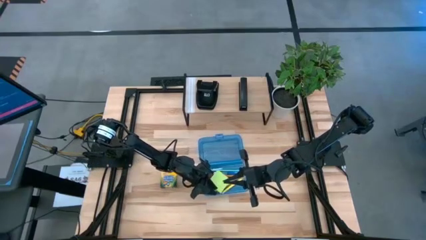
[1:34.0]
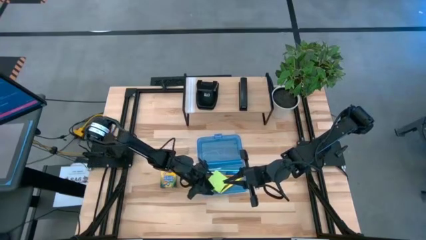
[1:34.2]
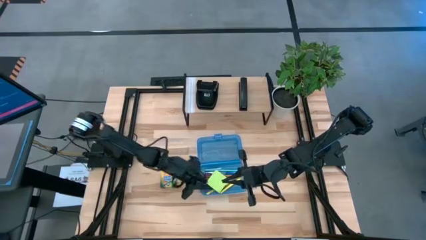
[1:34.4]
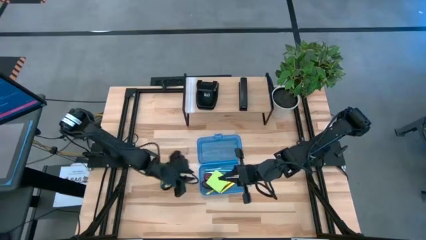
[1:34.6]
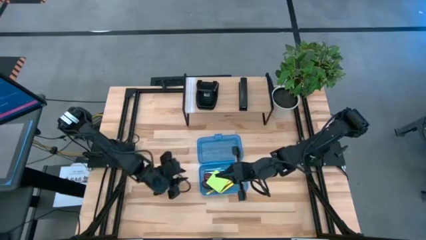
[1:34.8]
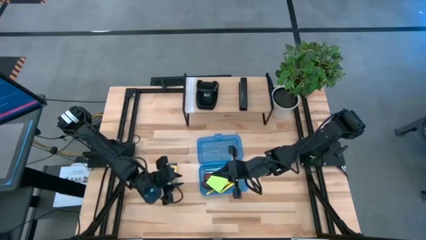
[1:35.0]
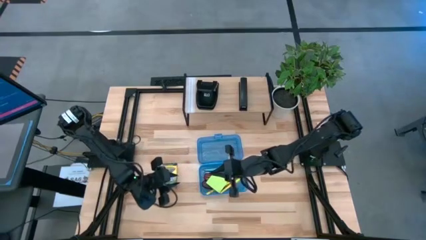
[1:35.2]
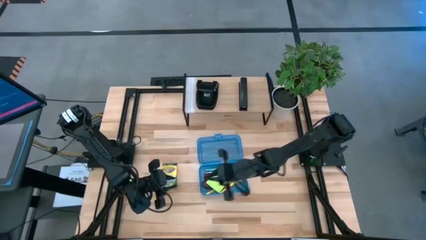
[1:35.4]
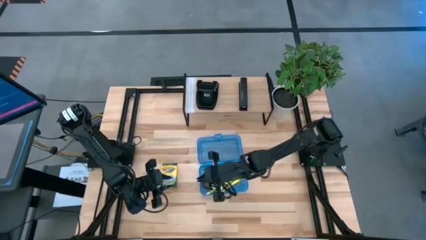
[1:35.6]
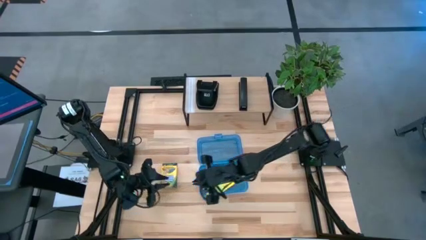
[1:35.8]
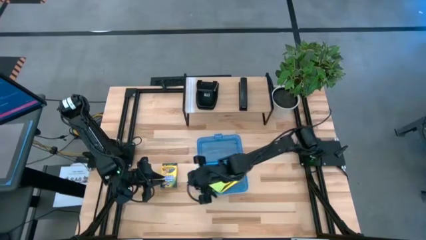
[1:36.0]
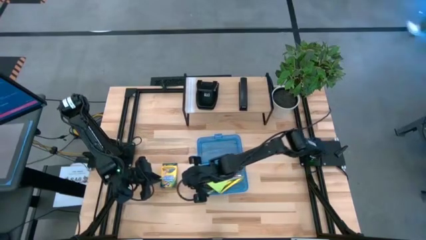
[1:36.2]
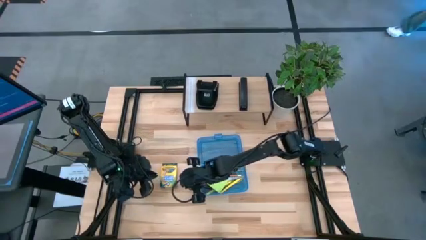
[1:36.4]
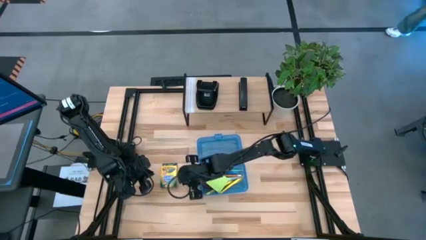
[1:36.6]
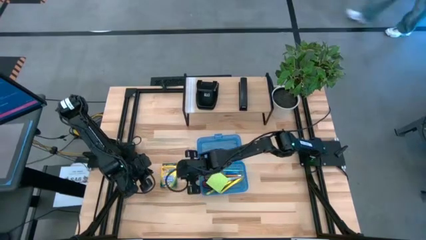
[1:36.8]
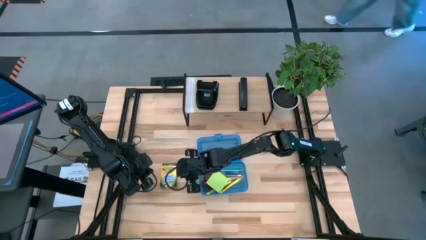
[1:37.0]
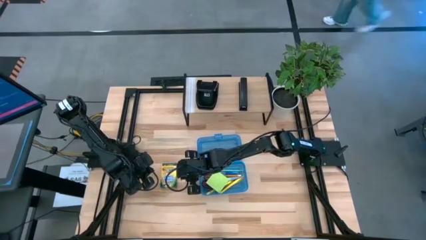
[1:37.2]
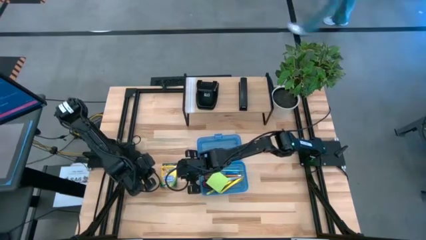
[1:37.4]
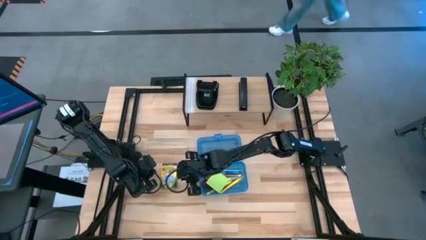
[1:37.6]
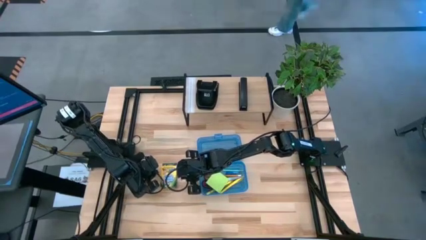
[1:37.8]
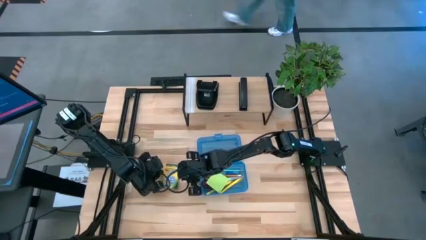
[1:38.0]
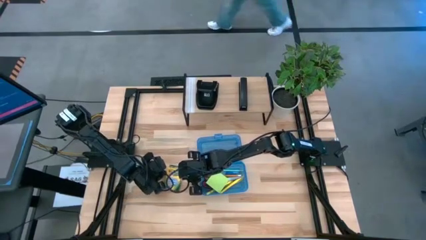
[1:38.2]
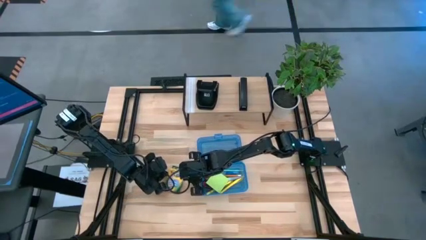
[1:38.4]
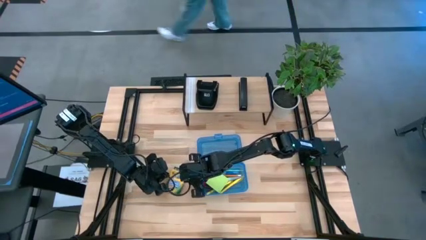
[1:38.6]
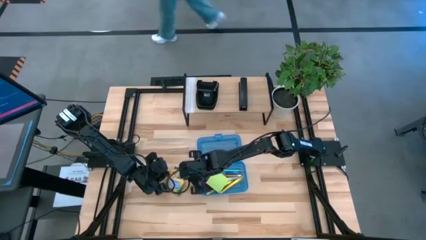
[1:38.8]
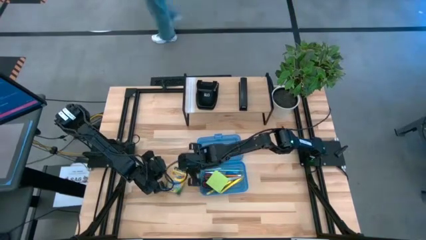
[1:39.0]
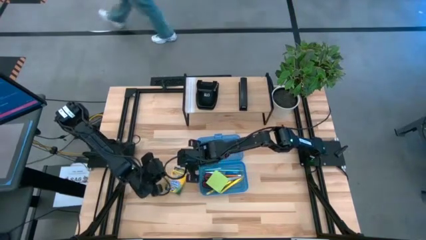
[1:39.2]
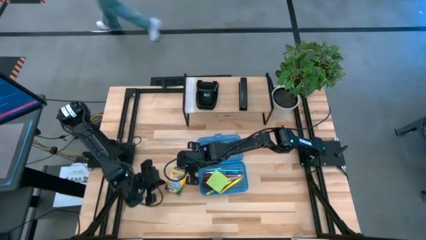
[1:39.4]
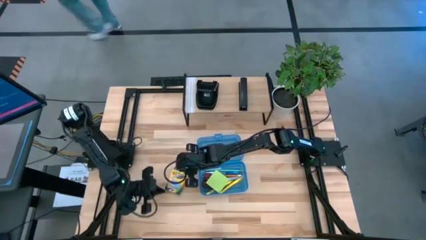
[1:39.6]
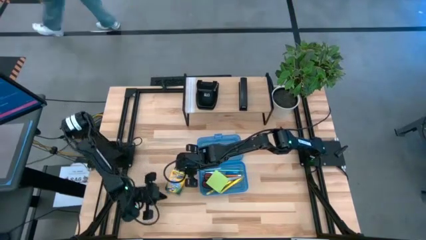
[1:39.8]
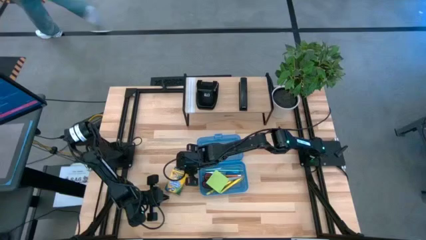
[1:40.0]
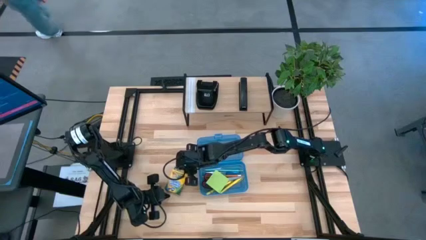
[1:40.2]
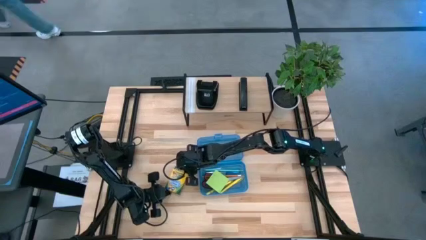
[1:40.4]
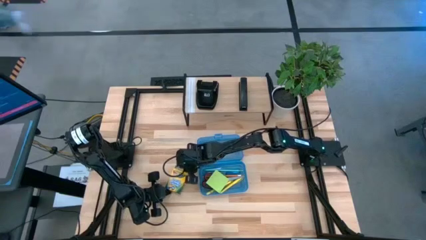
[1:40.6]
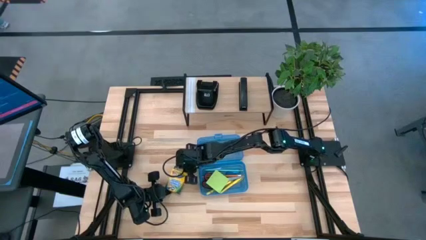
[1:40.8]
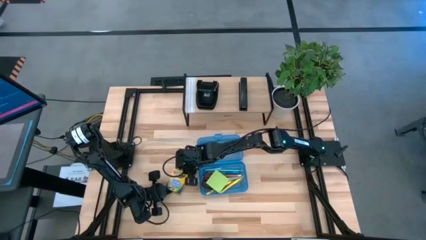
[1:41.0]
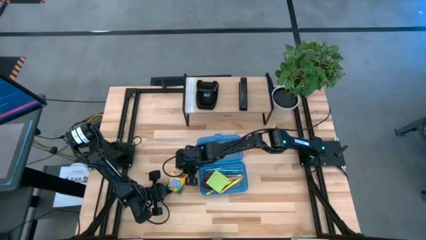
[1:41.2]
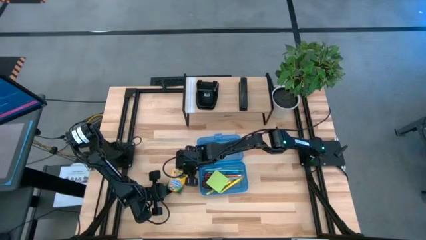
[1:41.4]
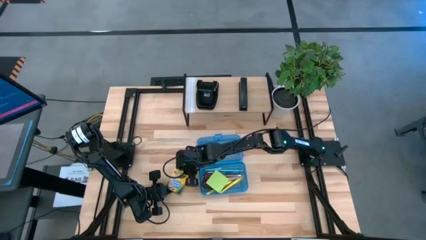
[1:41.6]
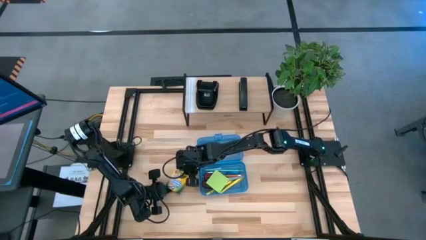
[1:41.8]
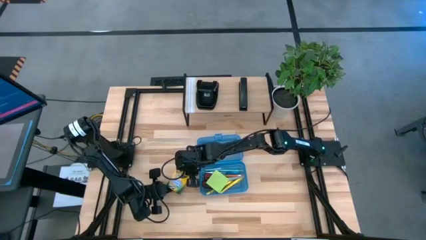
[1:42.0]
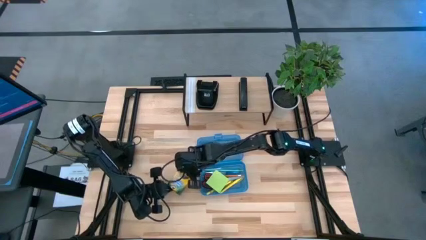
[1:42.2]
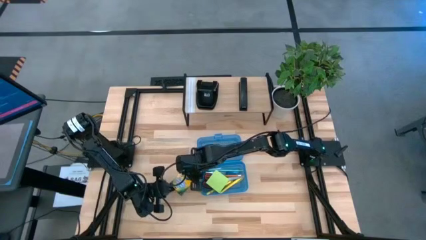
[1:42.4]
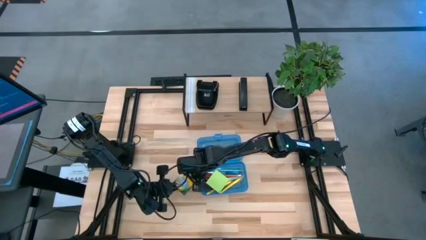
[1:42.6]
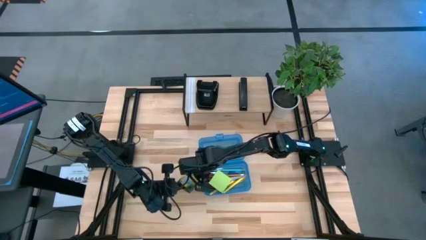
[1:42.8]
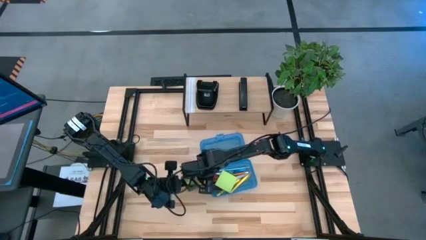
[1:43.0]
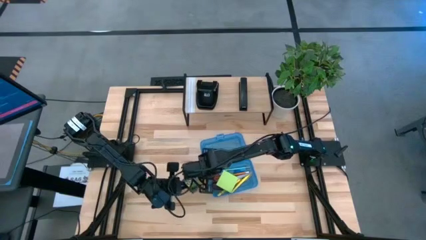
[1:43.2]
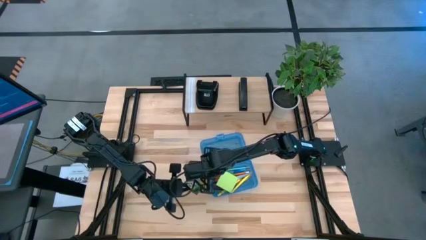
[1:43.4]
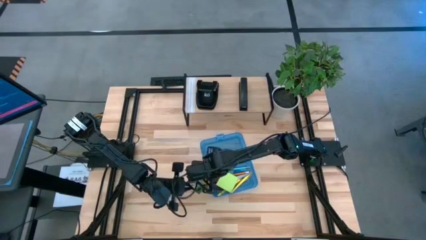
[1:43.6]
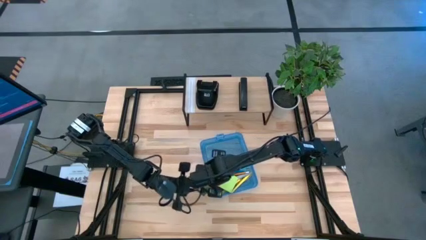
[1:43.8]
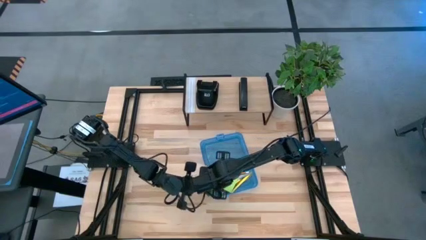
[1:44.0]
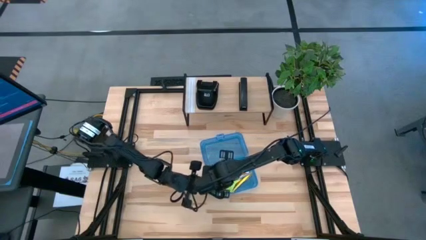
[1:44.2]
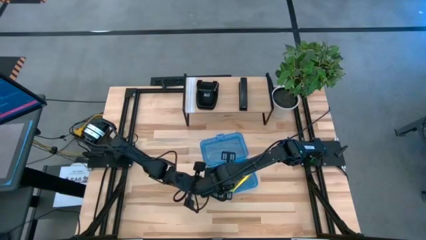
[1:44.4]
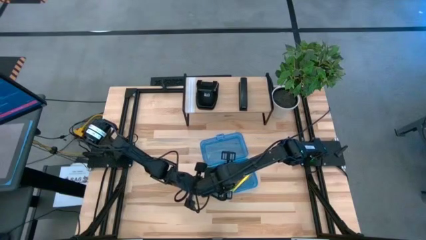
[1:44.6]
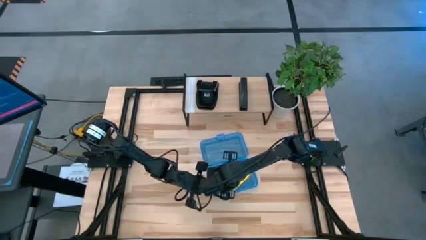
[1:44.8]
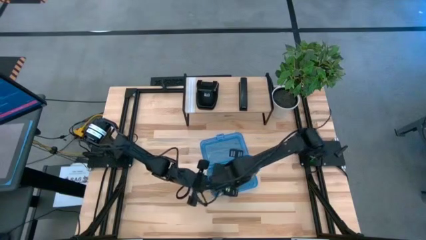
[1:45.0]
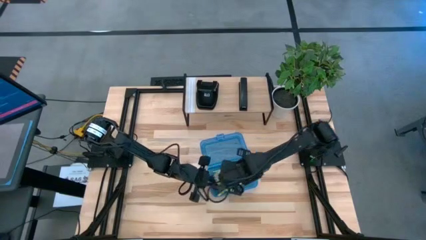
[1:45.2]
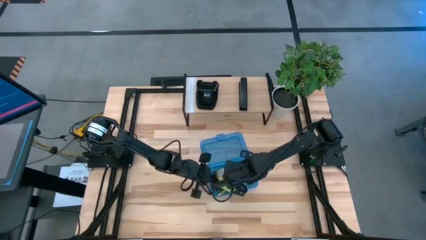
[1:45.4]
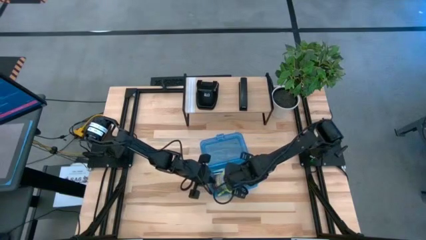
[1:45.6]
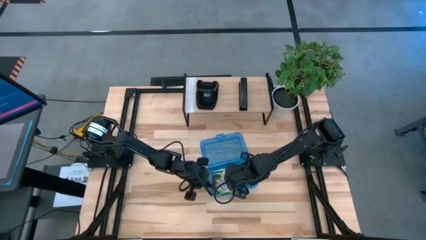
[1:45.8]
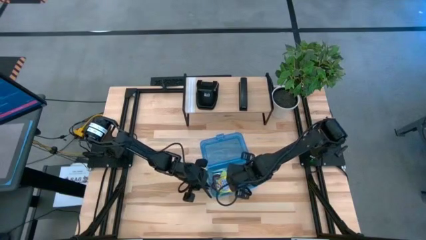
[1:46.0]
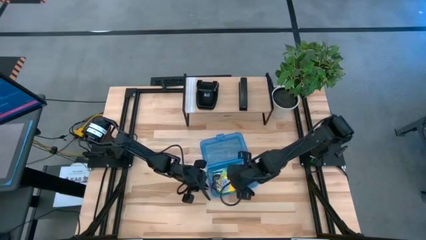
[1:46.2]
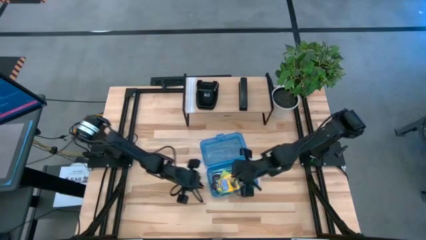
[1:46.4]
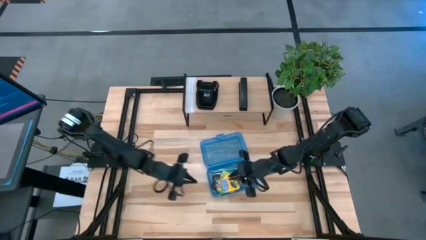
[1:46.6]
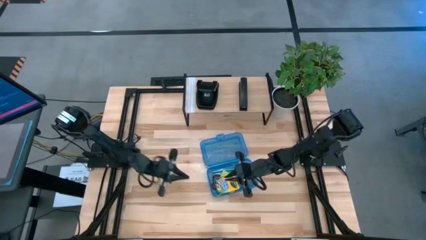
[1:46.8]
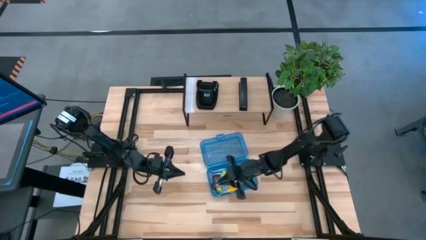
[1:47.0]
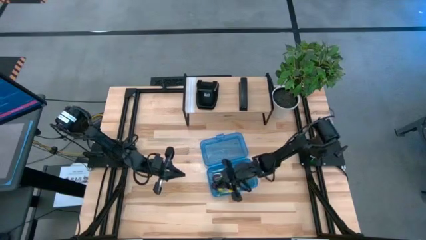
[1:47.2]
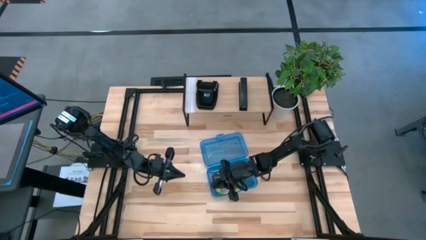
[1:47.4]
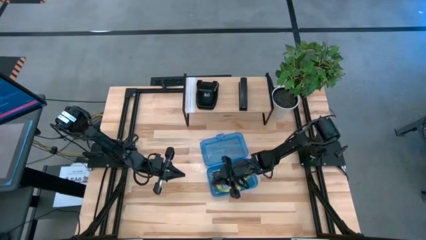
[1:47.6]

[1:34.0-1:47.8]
Task: Pack school essentials
Put the crayon box into the blue supply box
